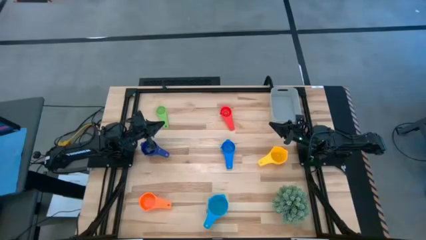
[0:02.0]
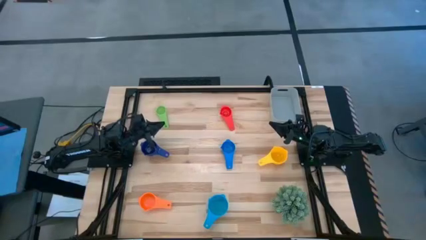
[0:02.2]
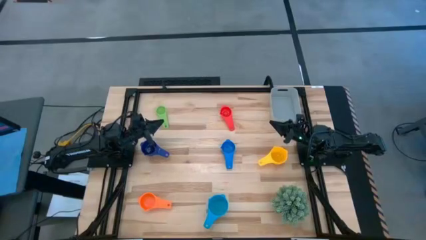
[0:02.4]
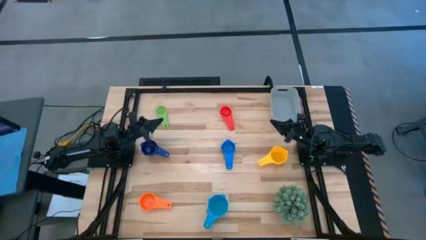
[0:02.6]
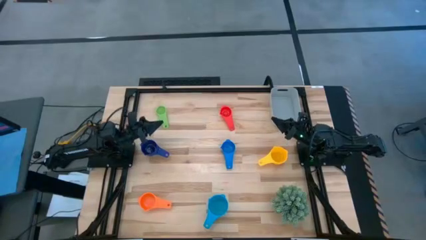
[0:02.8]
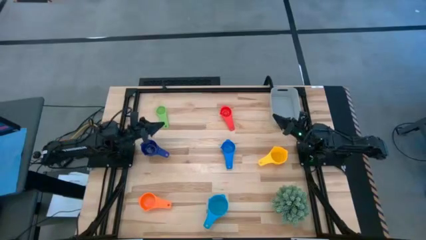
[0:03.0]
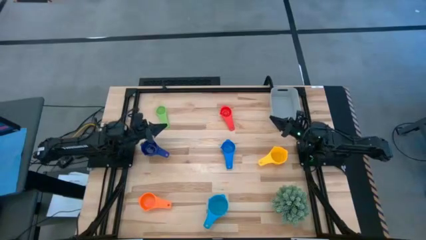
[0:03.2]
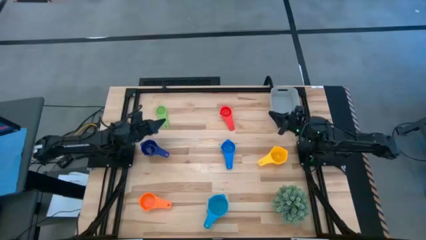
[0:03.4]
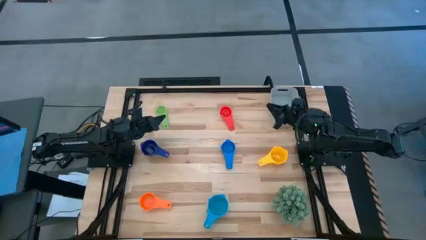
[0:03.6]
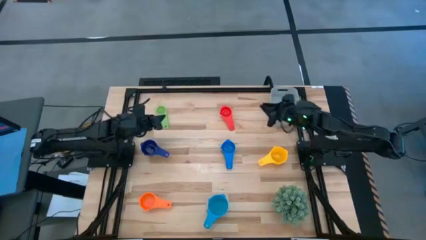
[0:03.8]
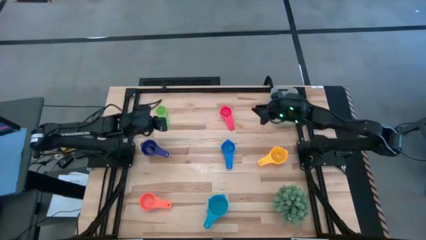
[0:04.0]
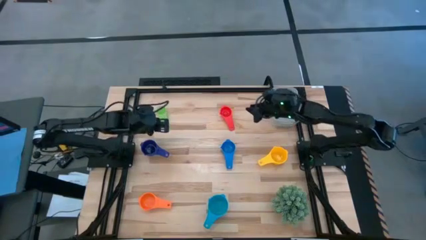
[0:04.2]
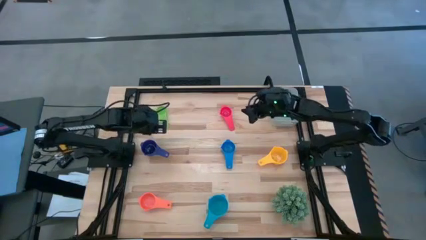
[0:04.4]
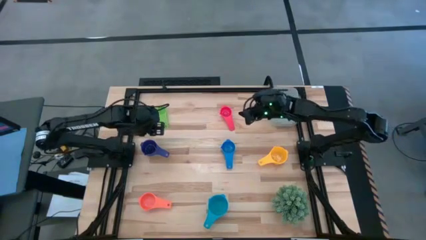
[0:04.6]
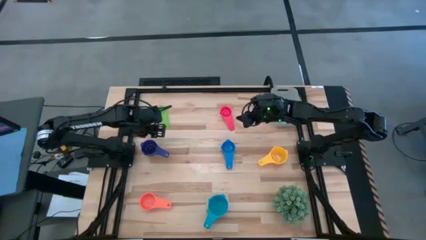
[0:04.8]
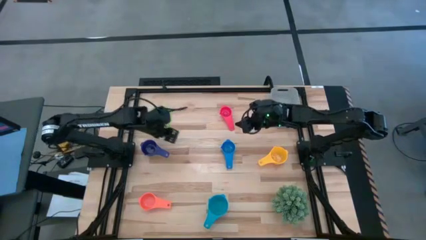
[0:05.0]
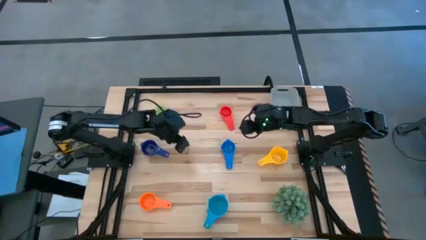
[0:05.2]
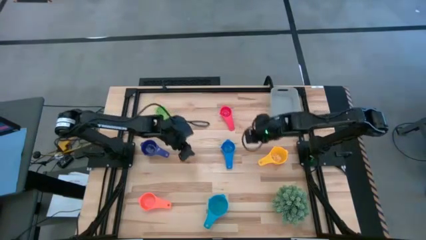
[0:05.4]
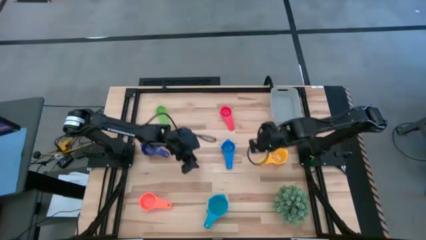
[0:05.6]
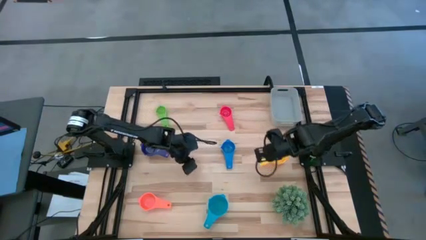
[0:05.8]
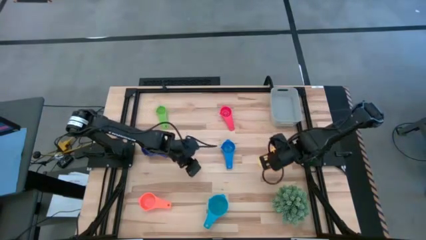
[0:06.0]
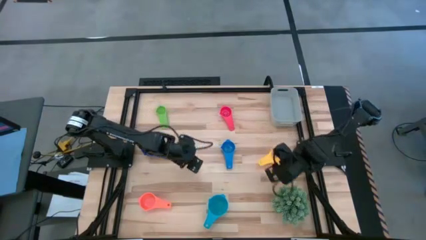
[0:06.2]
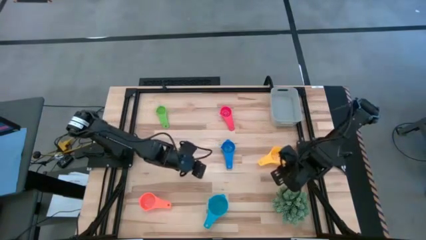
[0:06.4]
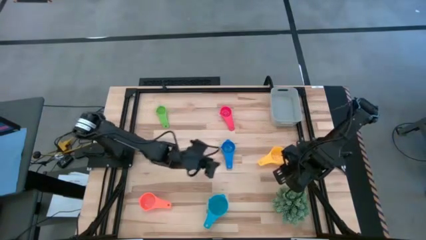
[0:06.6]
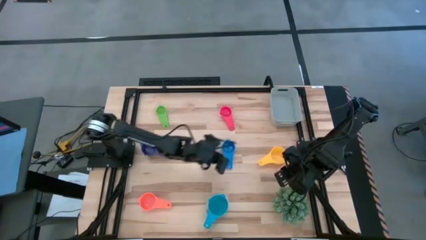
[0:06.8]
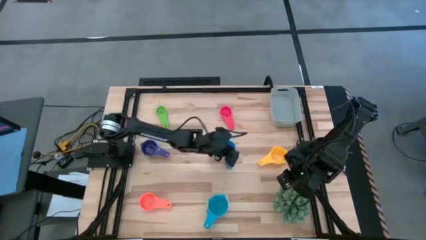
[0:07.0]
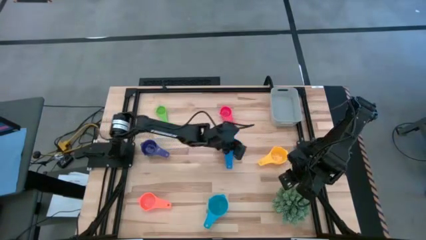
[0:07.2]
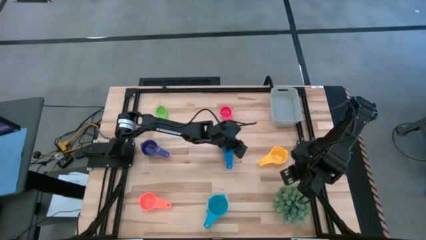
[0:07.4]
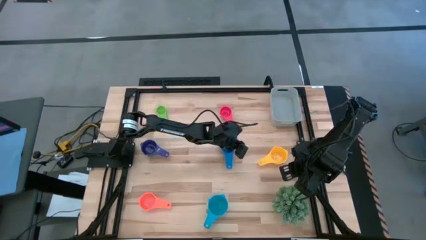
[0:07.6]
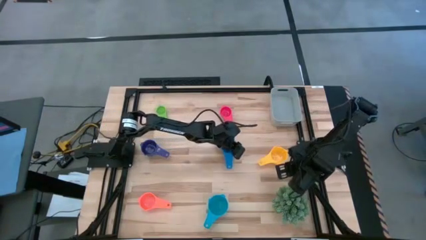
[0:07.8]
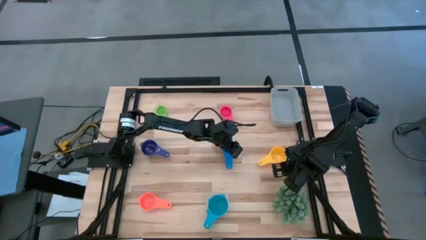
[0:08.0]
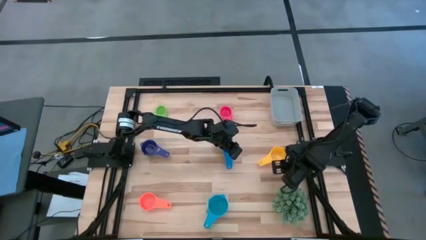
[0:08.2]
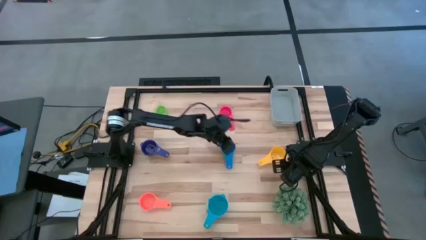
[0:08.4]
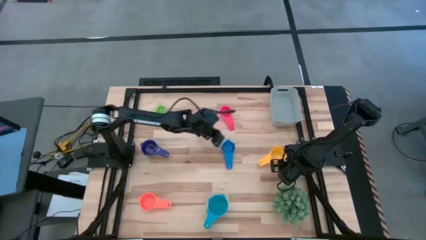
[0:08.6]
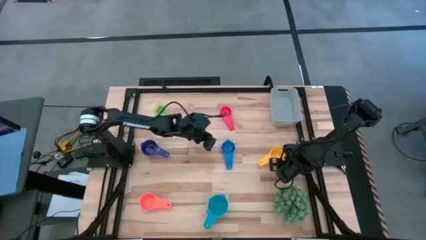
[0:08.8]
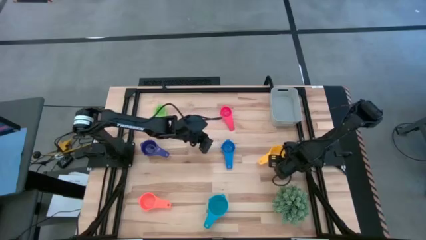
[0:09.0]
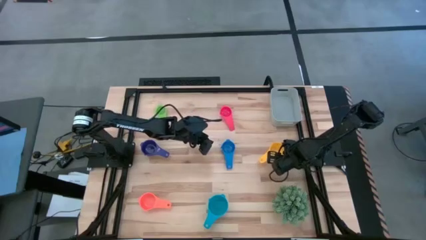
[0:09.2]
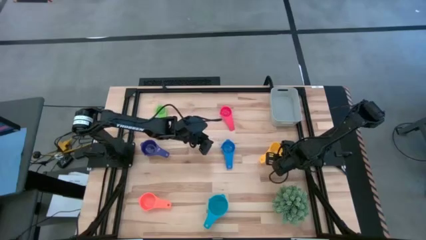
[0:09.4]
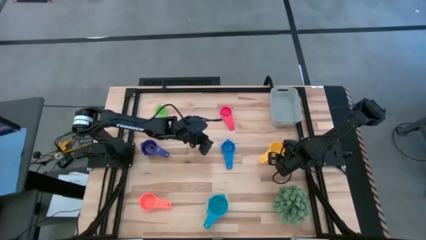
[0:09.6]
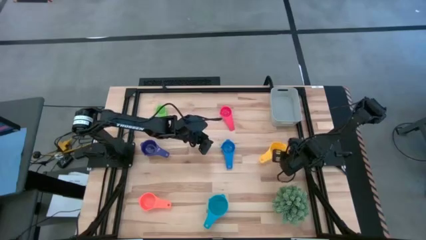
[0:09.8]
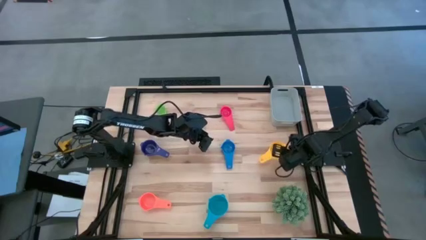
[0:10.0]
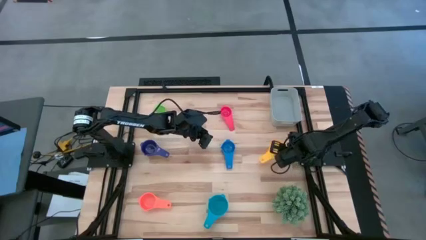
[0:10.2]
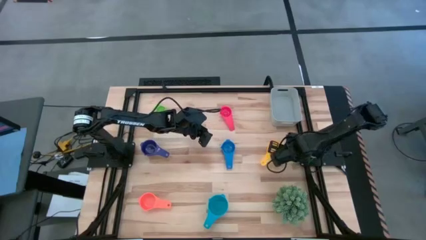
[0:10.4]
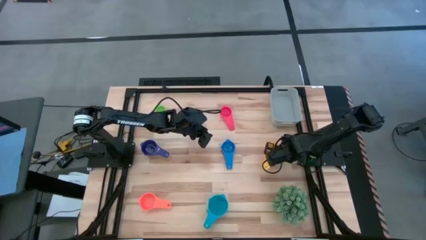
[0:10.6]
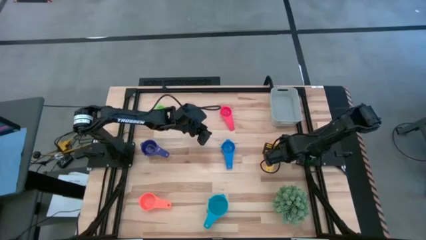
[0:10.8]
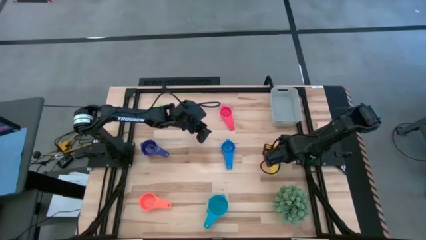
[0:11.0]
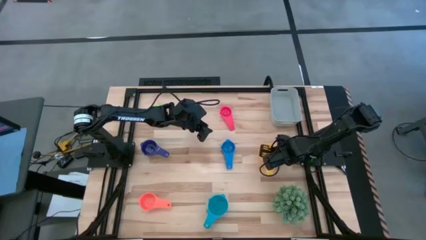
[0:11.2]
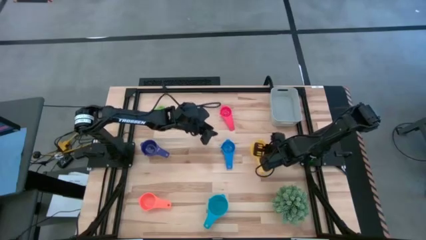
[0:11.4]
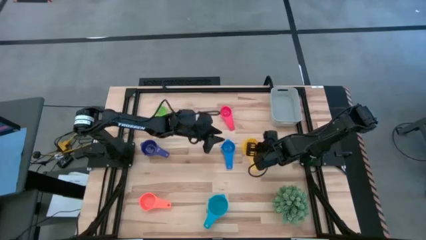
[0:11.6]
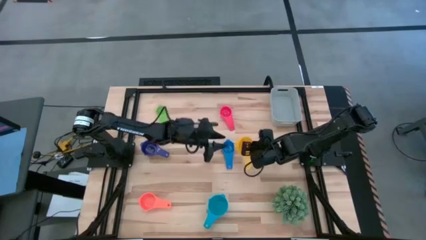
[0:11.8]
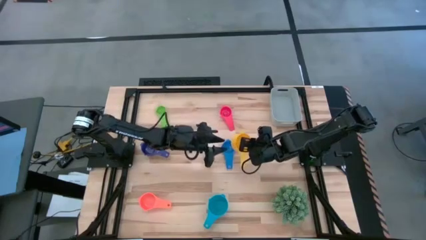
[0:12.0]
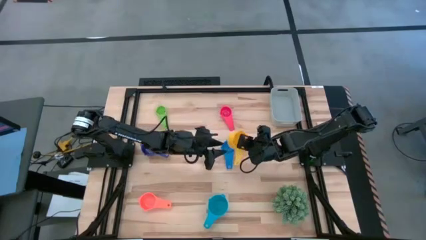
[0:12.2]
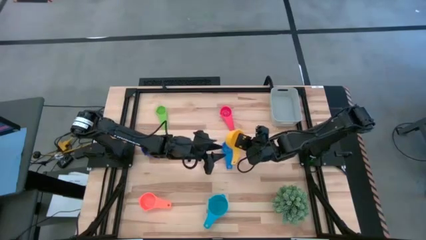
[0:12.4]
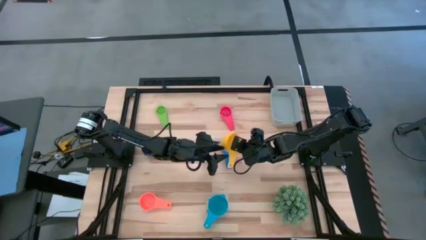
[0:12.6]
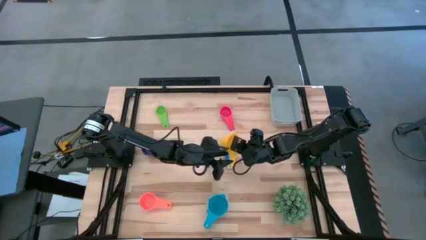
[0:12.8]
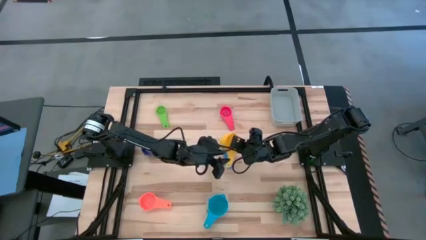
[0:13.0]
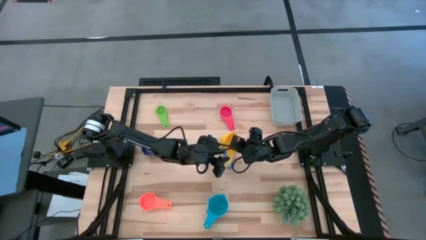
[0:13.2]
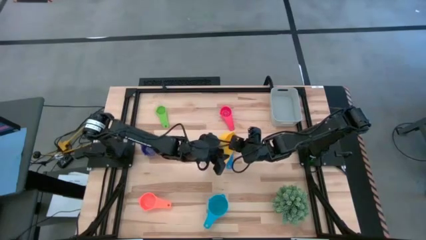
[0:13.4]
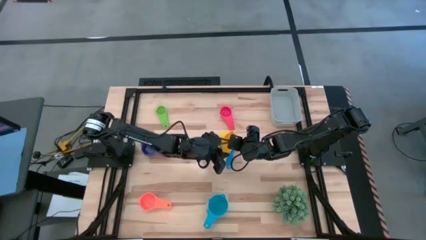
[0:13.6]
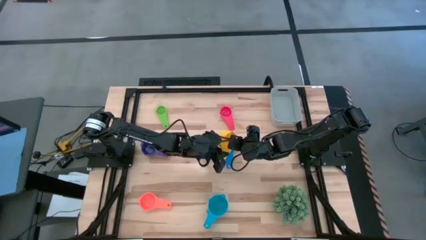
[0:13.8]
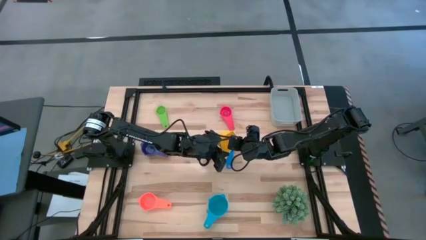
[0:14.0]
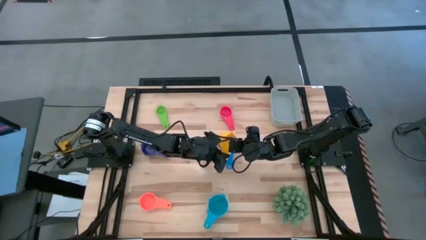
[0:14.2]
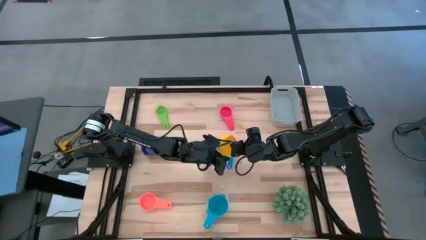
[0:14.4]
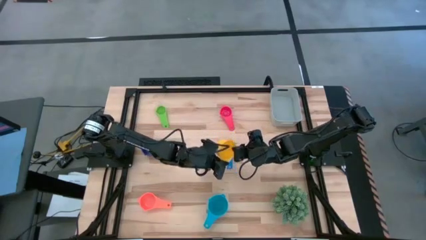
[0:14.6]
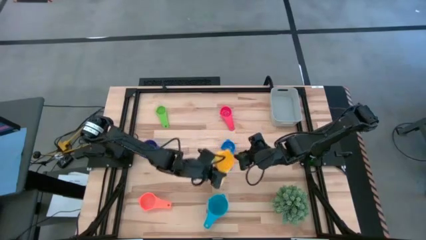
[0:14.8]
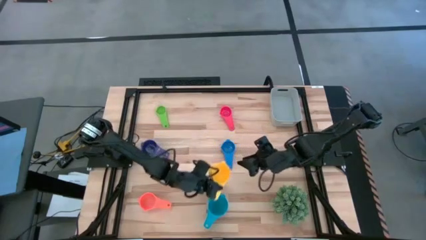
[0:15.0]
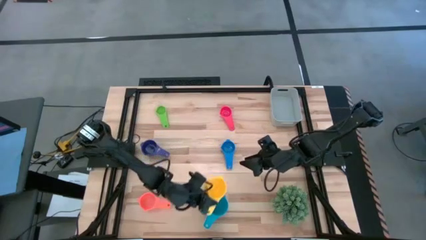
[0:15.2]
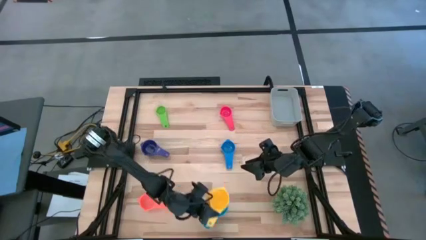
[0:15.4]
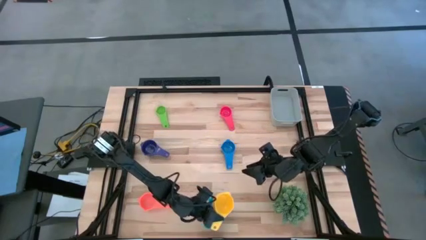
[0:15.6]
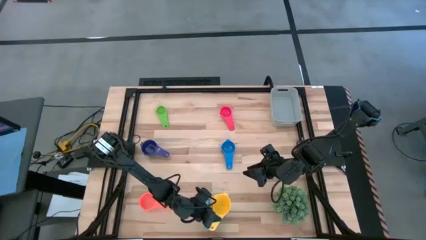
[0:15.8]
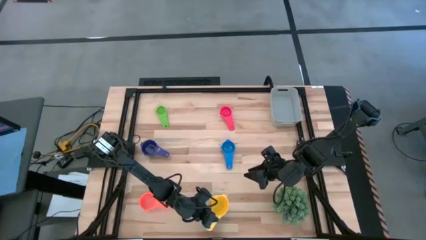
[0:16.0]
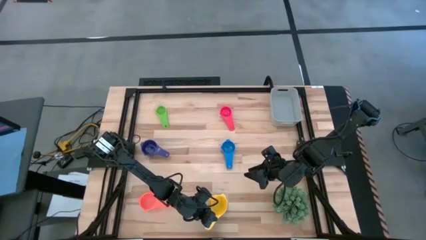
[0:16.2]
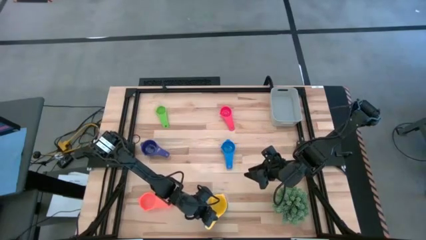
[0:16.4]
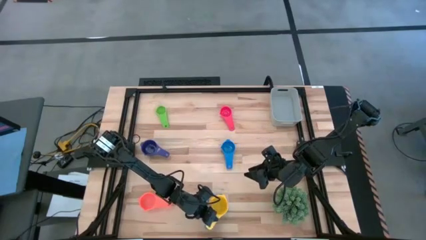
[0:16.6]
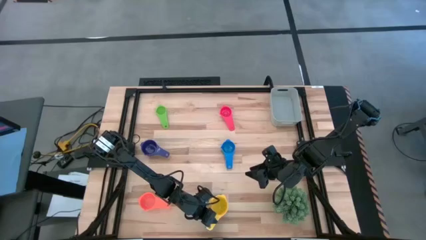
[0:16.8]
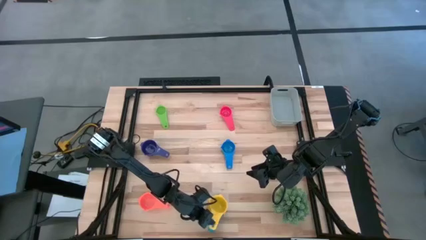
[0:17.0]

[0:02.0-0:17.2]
Task: Nest measuring cups in basket
Stack the yellow measuring cup on top of the light blue measuring cup
